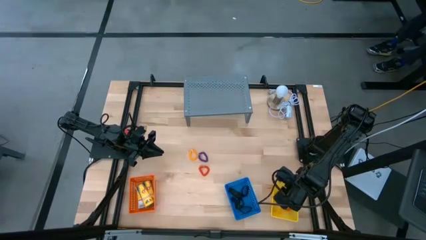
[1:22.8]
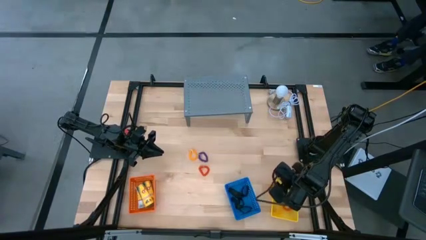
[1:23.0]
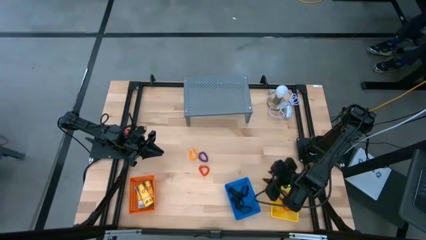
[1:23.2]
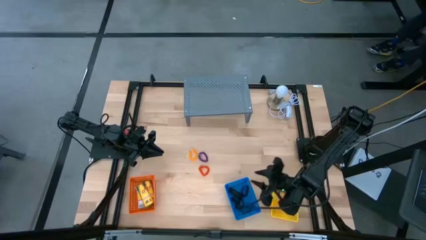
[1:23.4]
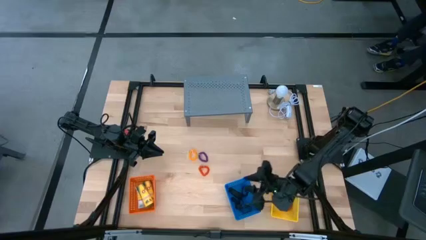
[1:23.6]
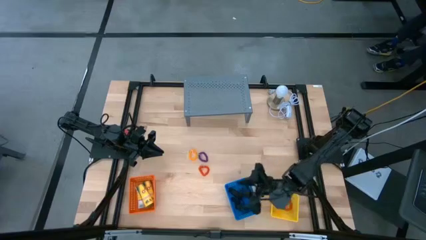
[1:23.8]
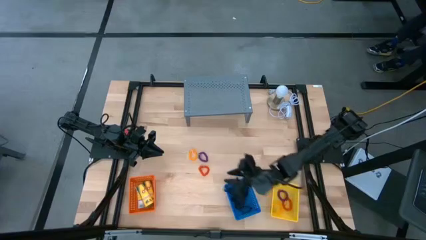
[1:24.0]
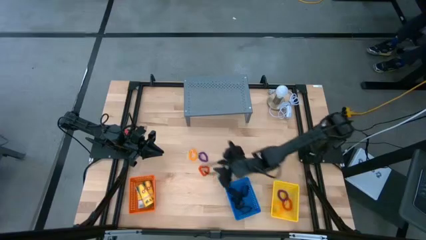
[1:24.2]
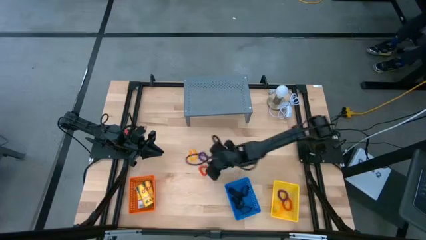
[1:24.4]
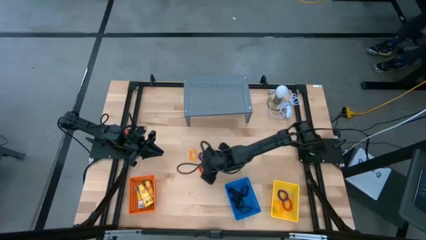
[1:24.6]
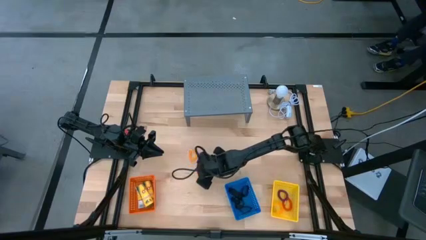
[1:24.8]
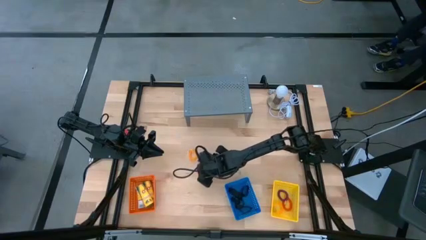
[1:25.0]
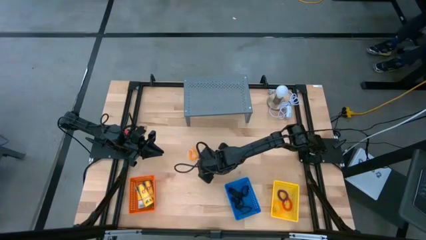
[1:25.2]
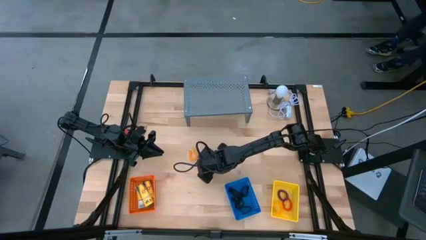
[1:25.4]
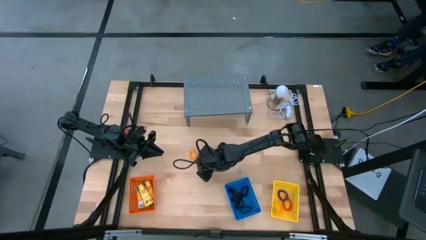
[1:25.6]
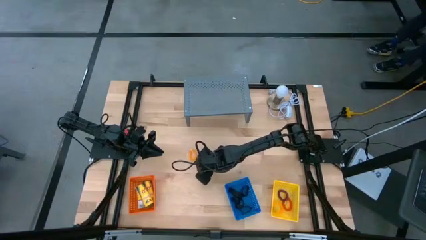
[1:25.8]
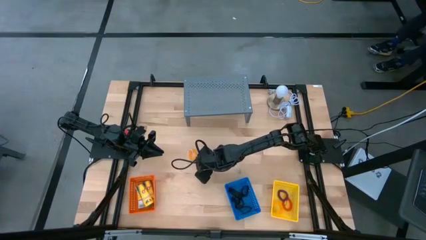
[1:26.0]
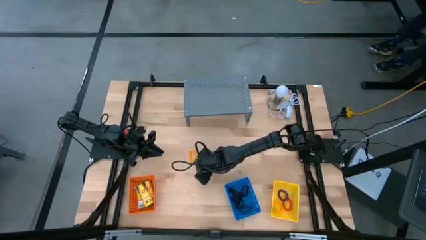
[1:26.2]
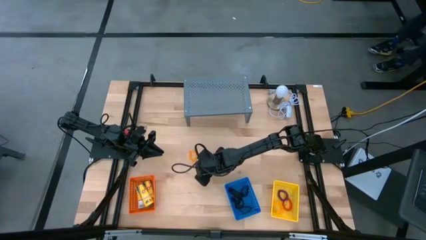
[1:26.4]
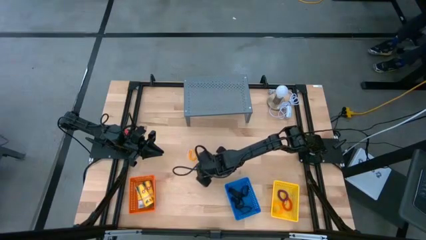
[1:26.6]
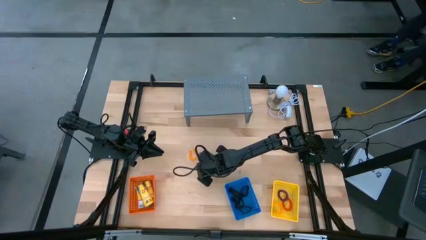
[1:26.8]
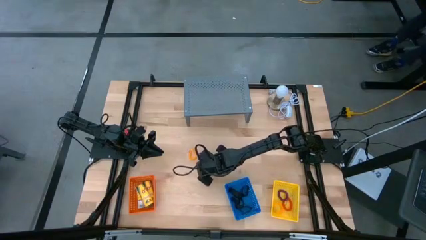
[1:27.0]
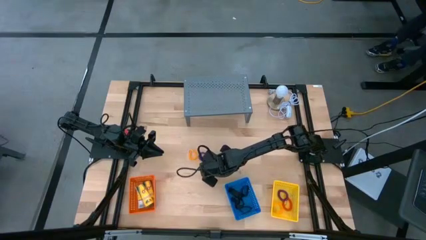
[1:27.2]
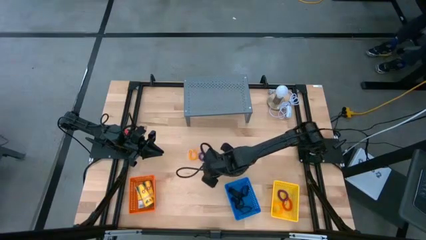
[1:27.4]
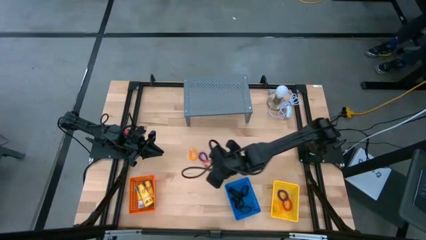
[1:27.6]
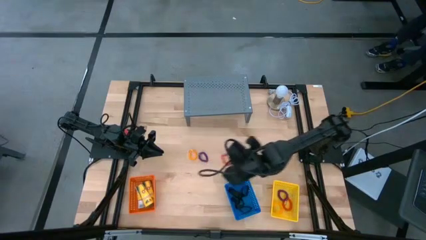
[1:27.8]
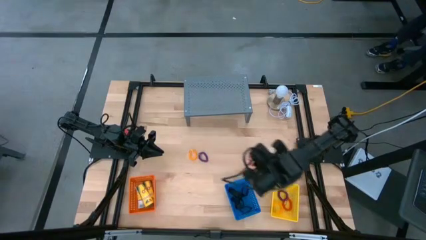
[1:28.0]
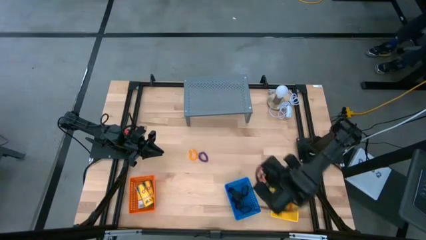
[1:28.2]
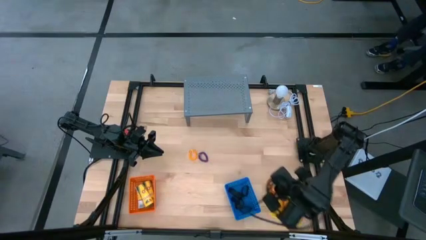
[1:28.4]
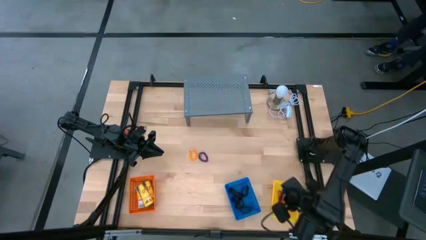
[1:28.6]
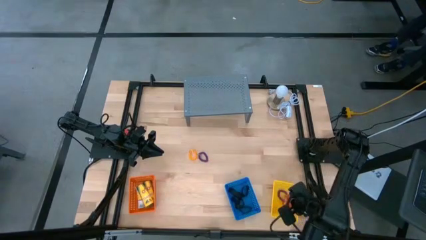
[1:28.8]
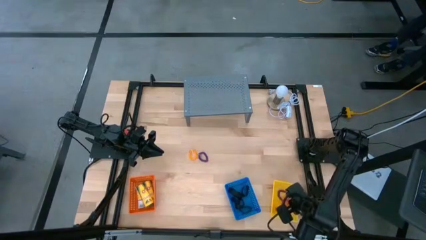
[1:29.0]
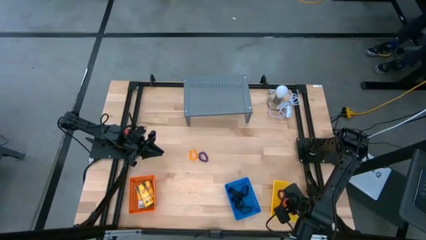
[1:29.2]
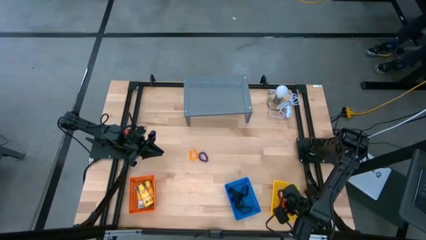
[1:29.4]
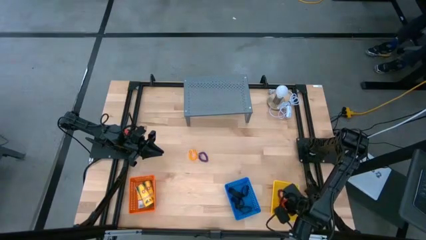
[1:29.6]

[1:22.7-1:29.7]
Task: Pick & Place Office Desk Supplies
Put the orange spring keychain into the yellow bin

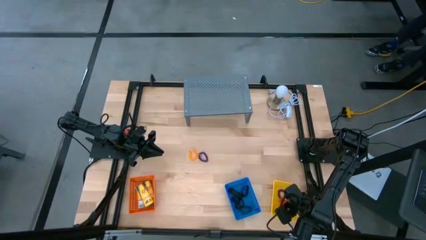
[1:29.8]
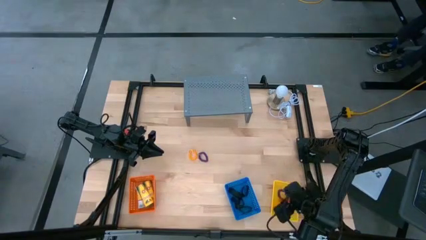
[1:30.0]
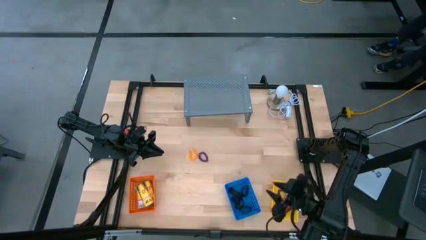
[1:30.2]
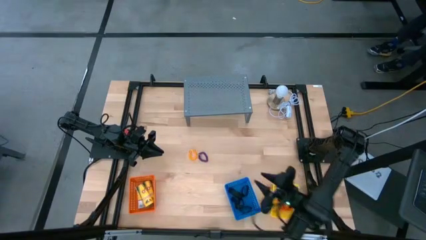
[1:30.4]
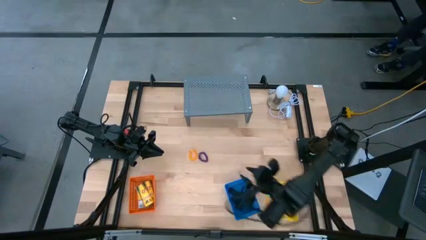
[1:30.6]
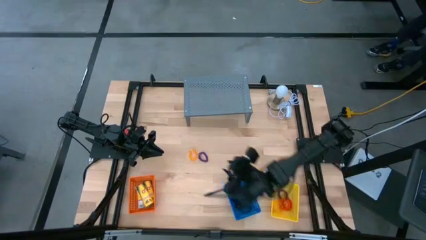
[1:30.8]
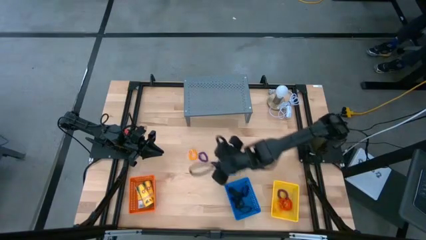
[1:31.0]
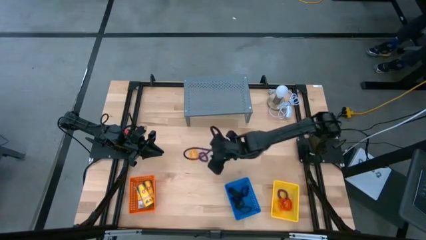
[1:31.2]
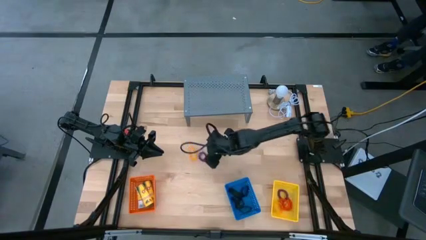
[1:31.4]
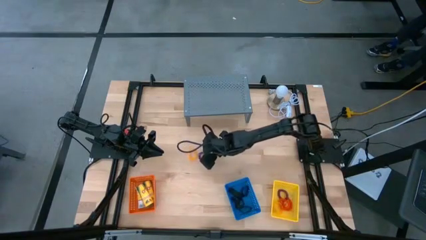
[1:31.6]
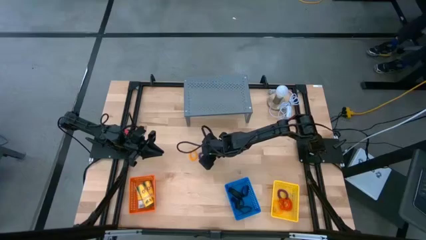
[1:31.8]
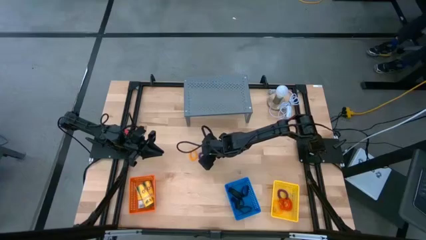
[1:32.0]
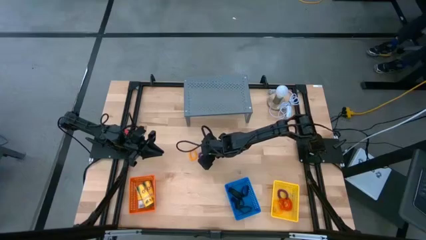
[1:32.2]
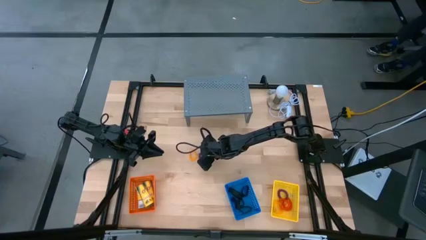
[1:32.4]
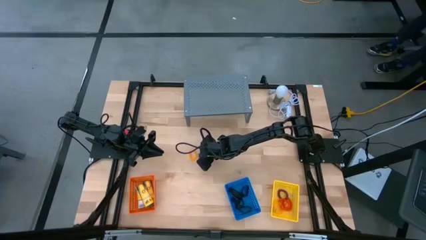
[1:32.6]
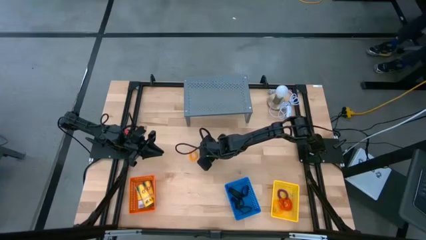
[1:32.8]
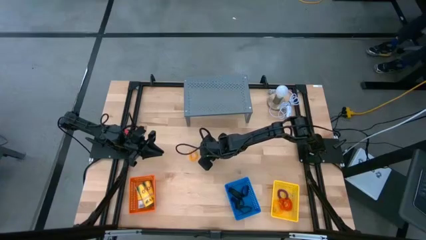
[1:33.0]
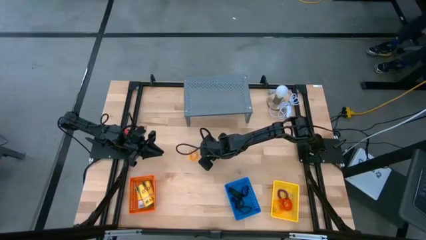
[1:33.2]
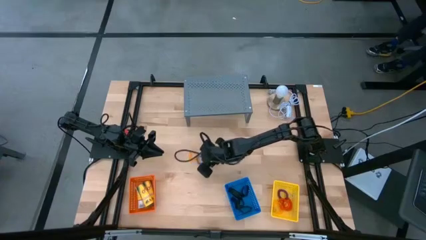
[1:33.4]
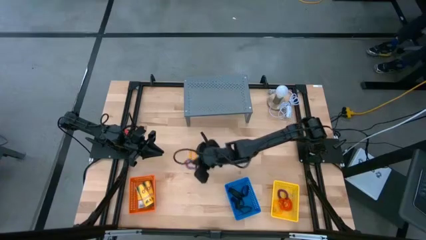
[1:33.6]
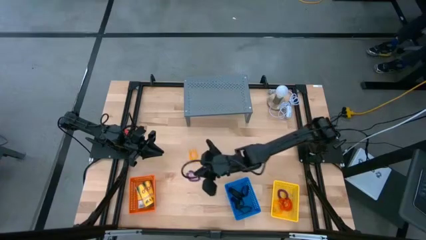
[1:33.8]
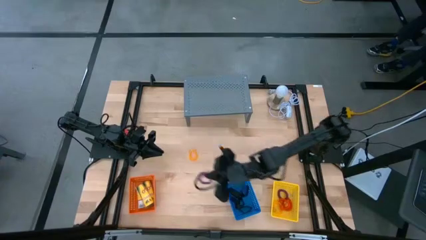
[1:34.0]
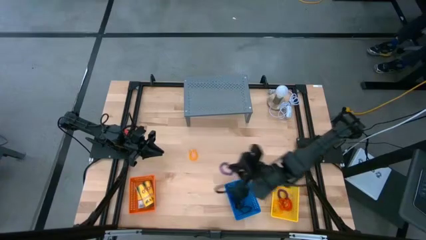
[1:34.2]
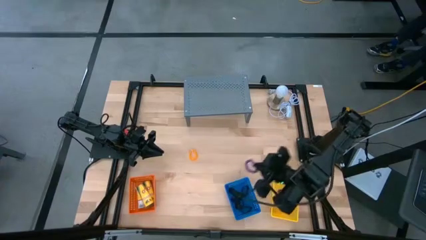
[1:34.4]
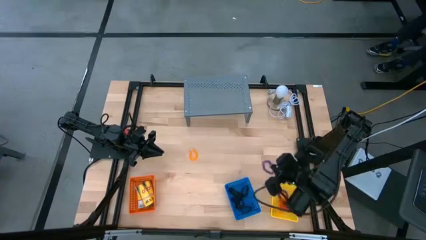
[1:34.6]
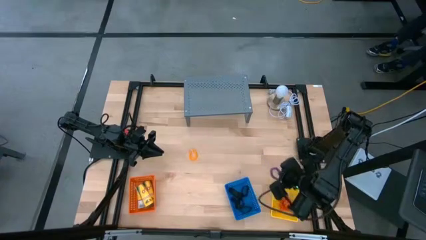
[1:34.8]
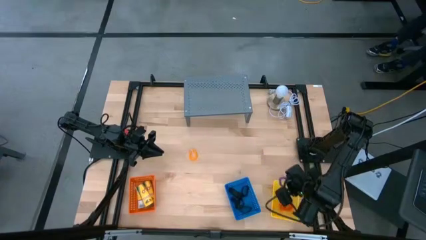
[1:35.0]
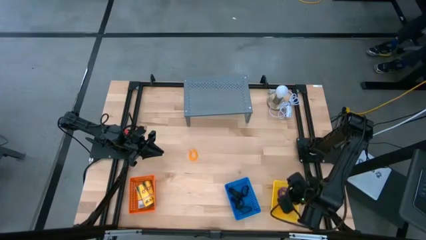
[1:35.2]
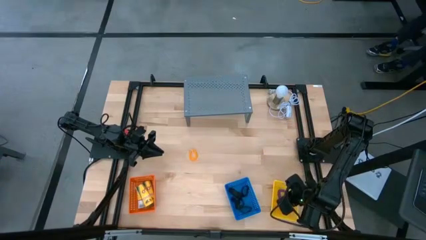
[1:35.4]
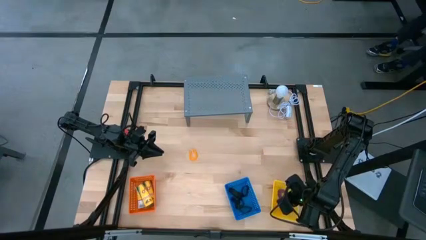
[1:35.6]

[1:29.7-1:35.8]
Put the violet spring keychain into the yellow bin

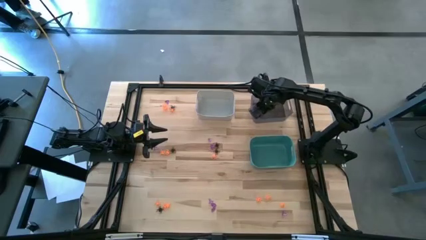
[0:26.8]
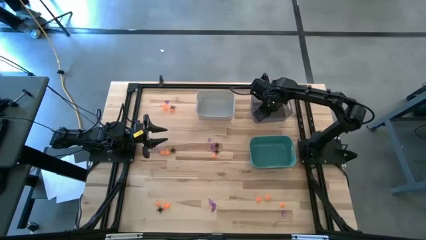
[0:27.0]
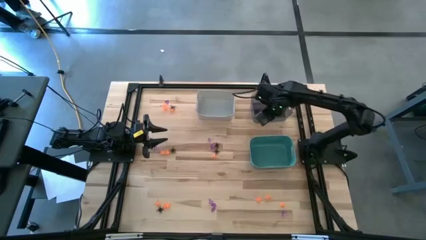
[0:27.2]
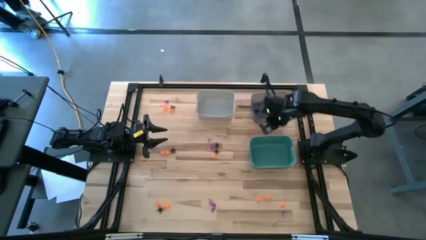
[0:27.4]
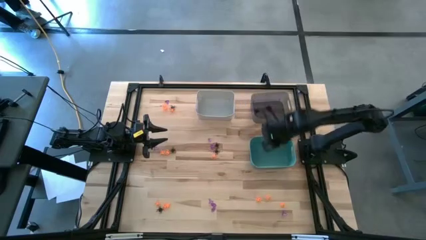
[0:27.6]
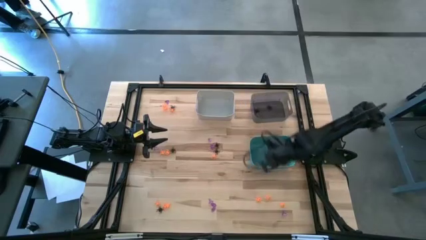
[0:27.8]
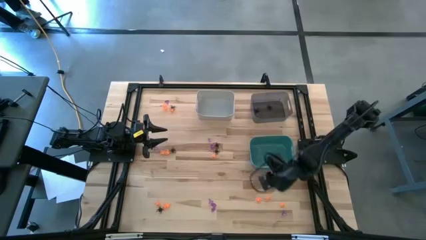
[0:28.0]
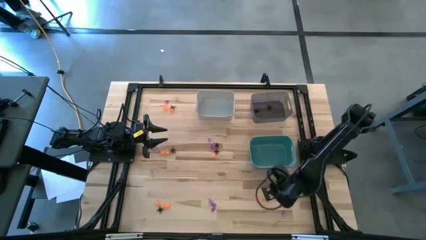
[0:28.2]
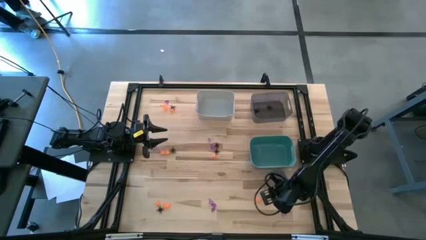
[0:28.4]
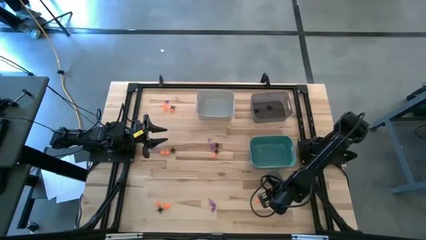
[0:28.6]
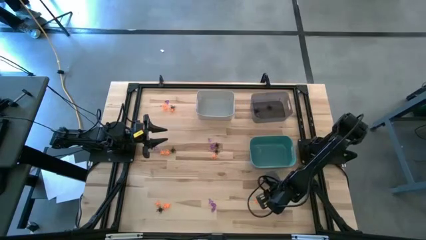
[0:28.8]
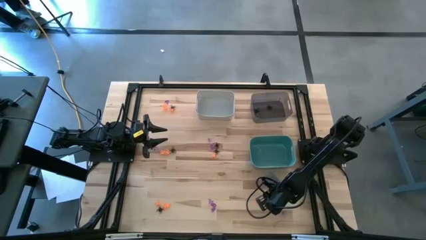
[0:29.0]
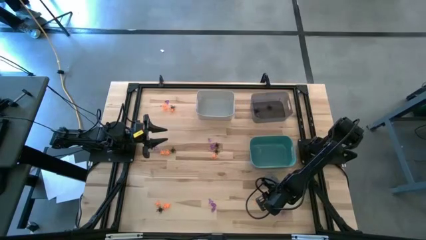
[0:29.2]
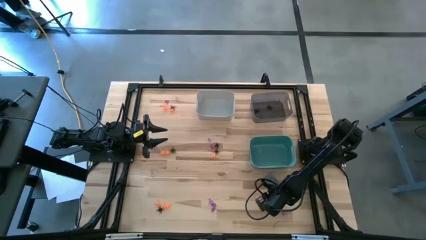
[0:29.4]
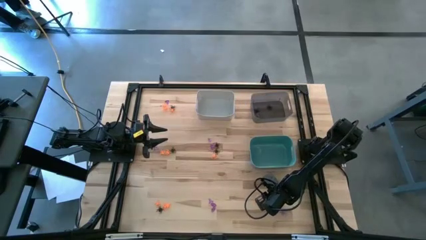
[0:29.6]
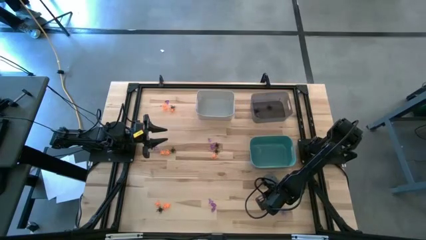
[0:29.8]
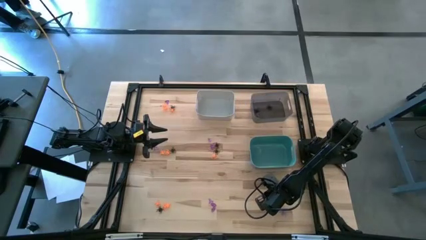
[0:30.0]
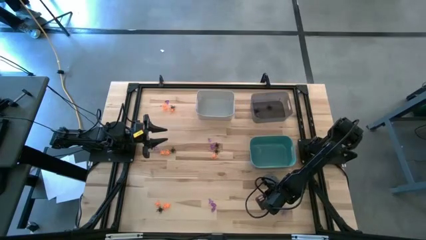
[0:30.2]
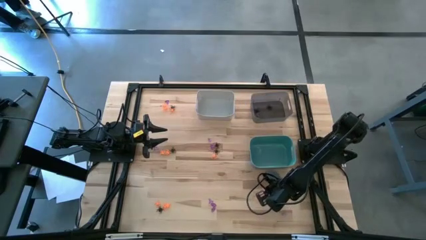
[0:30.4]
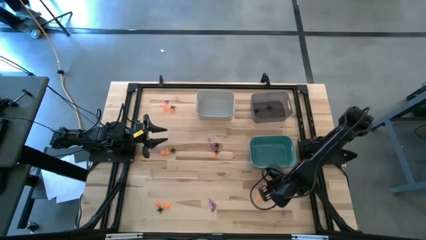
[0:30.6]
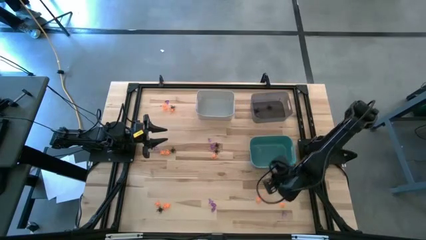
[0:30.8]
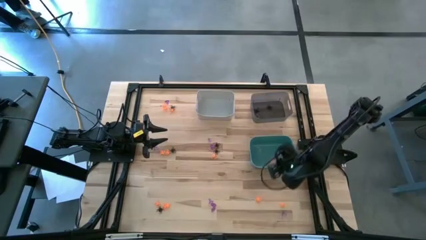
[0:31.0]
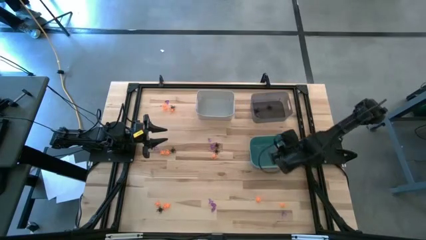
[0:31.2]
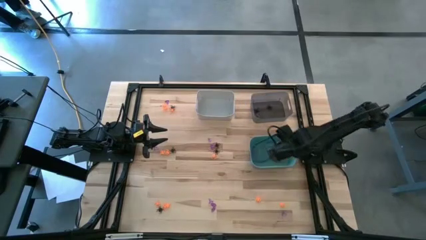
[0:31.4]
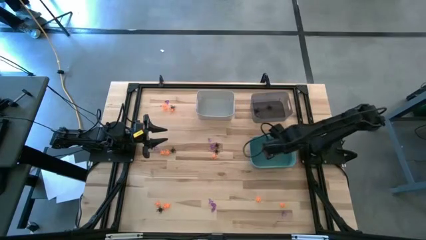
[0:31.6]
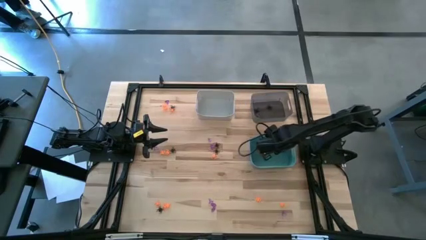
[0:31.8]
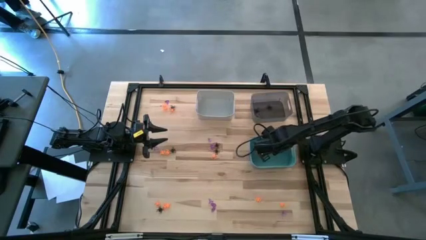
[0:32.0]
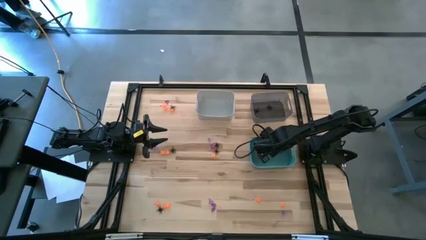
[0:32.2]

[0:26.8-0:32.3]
Task: Sort Halloween decoration
Put the orange spider toy into the green bin
